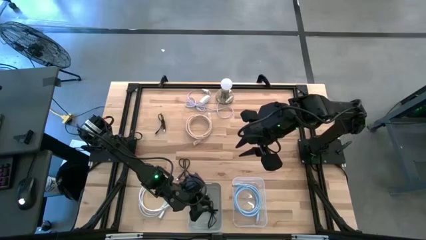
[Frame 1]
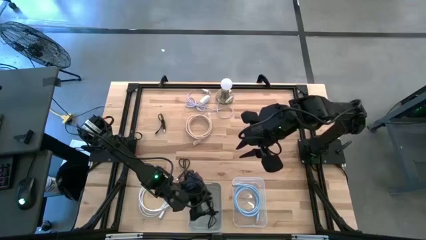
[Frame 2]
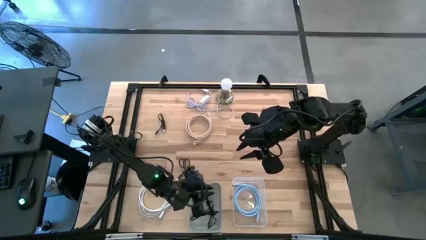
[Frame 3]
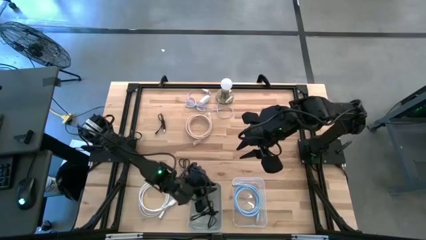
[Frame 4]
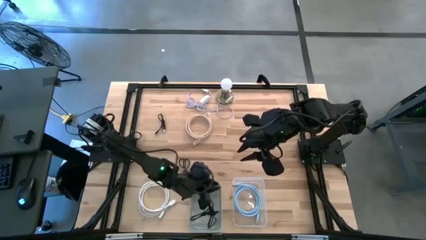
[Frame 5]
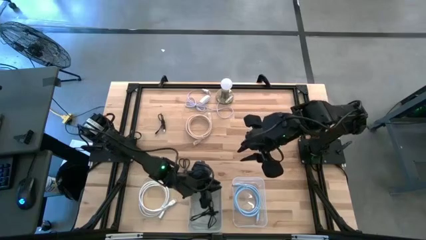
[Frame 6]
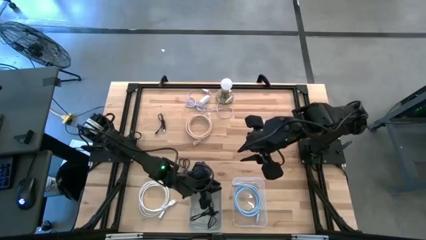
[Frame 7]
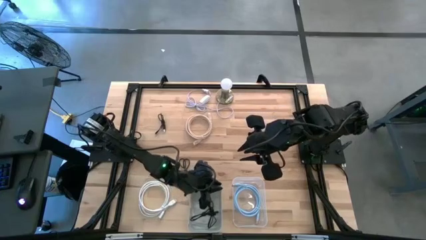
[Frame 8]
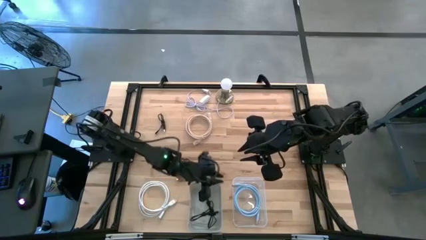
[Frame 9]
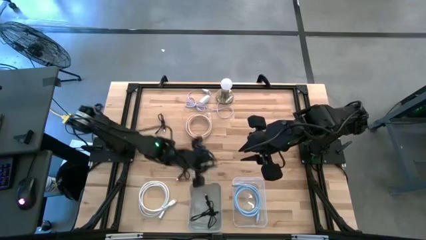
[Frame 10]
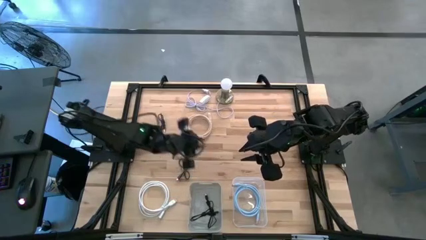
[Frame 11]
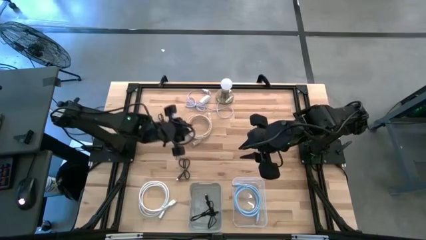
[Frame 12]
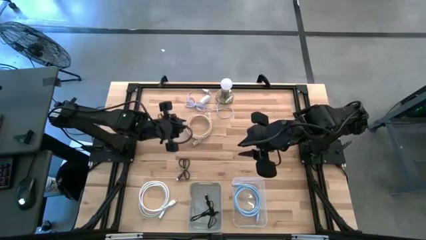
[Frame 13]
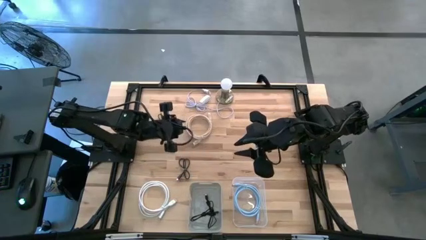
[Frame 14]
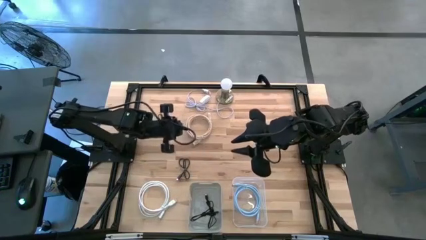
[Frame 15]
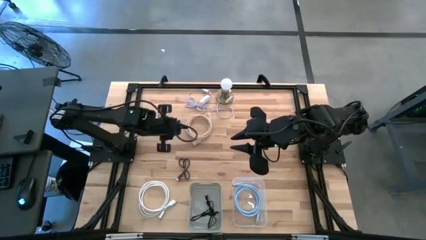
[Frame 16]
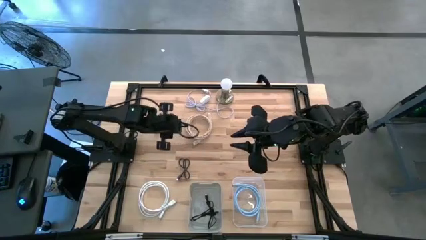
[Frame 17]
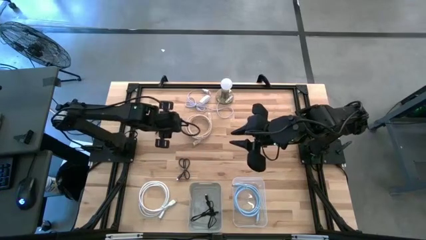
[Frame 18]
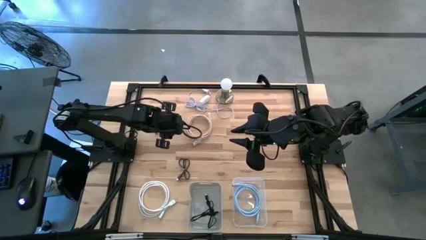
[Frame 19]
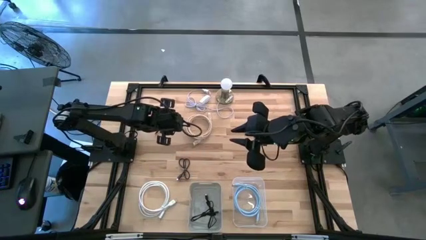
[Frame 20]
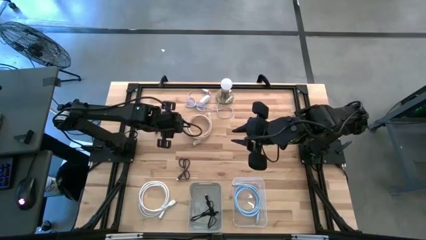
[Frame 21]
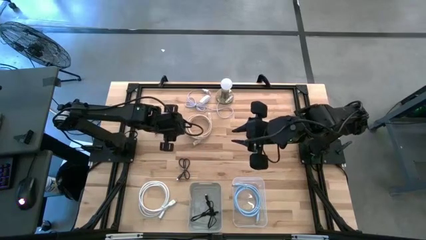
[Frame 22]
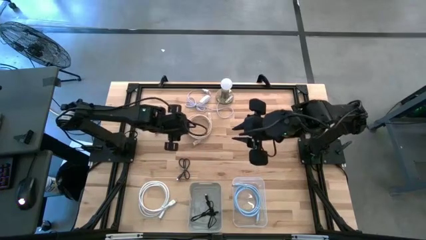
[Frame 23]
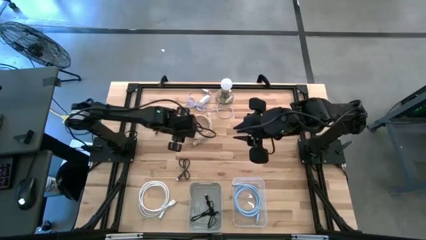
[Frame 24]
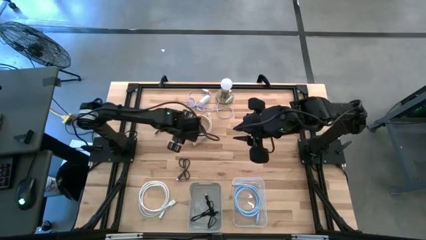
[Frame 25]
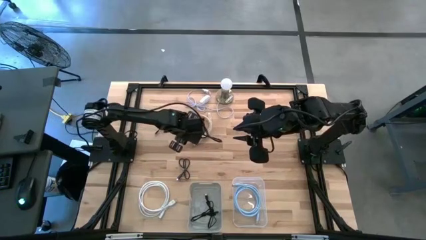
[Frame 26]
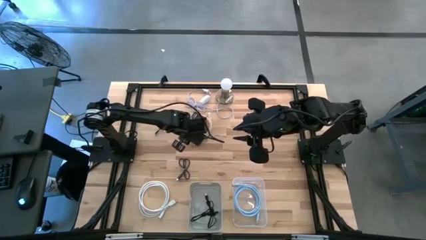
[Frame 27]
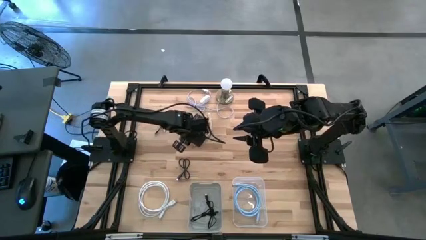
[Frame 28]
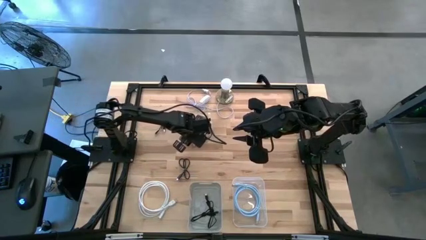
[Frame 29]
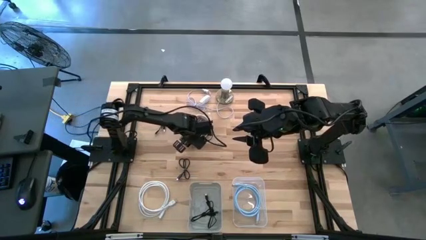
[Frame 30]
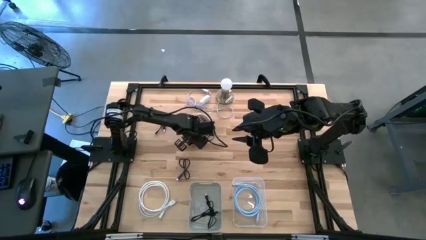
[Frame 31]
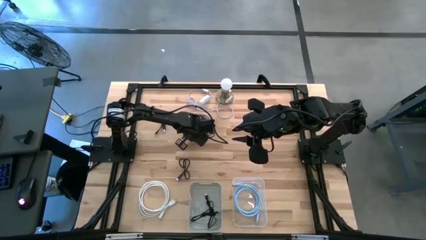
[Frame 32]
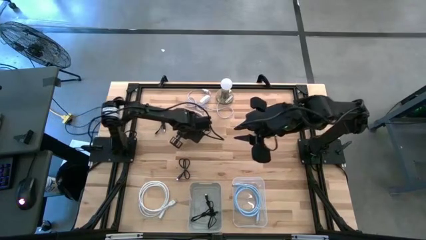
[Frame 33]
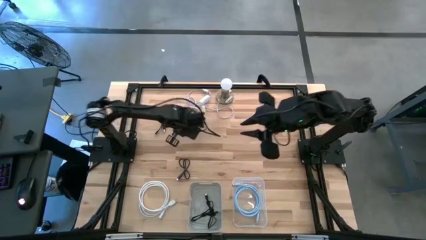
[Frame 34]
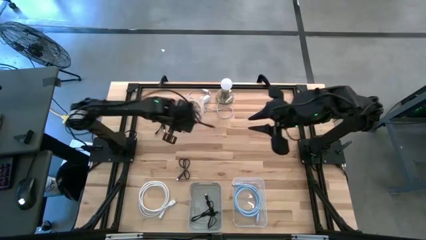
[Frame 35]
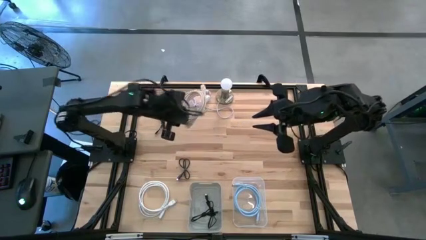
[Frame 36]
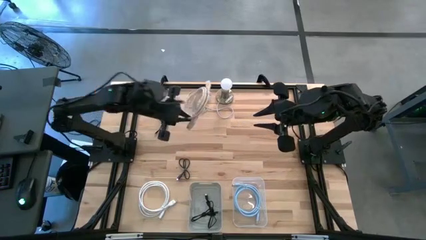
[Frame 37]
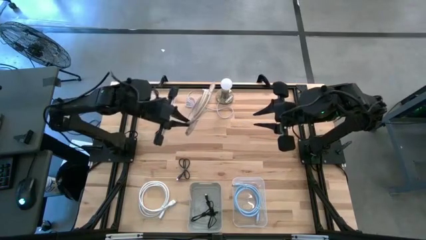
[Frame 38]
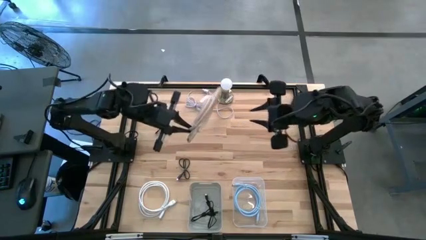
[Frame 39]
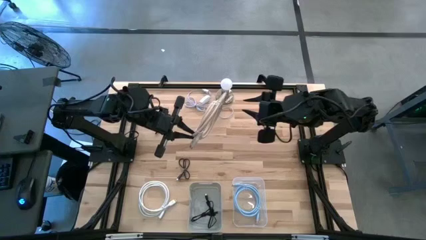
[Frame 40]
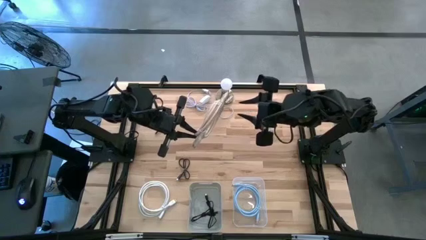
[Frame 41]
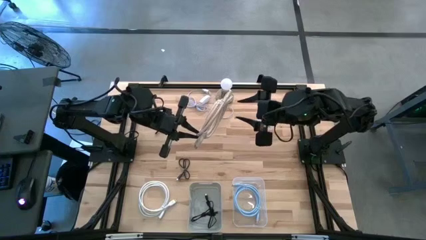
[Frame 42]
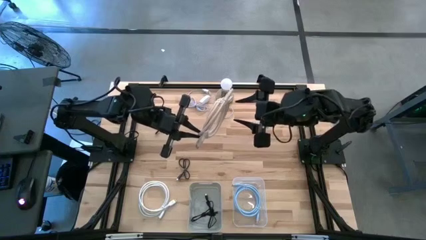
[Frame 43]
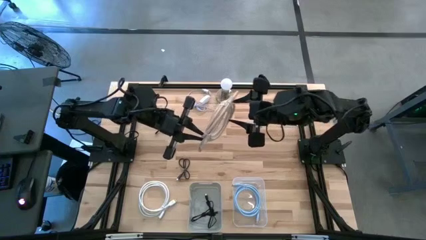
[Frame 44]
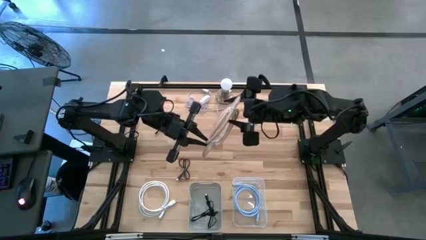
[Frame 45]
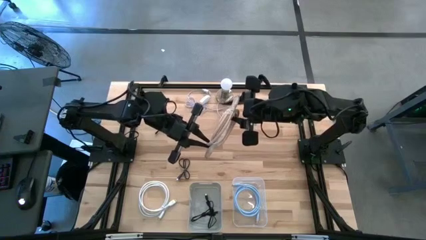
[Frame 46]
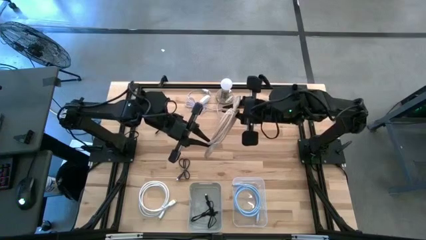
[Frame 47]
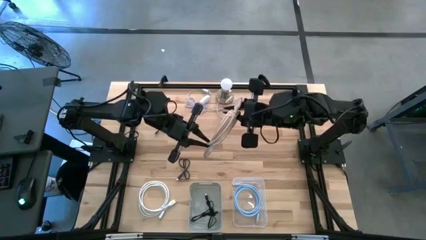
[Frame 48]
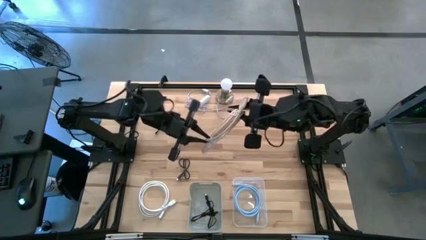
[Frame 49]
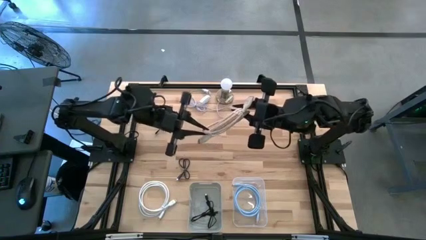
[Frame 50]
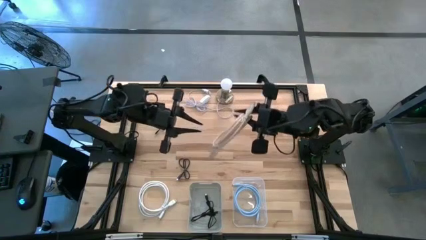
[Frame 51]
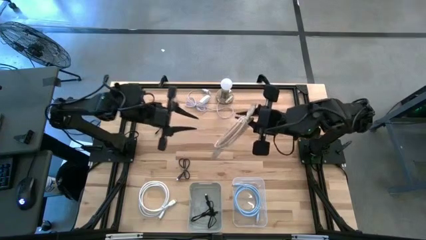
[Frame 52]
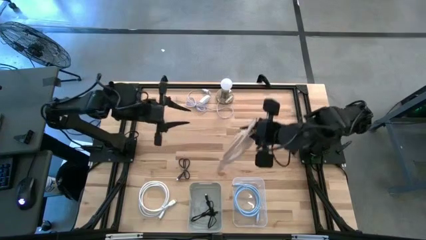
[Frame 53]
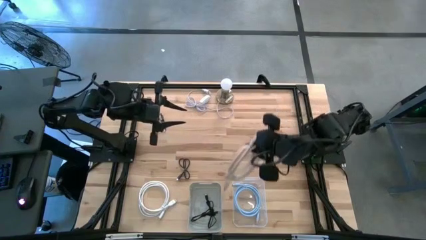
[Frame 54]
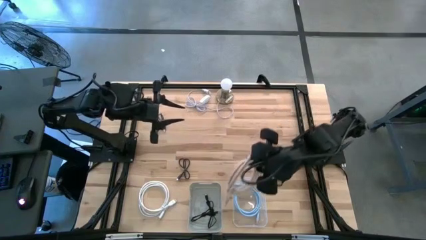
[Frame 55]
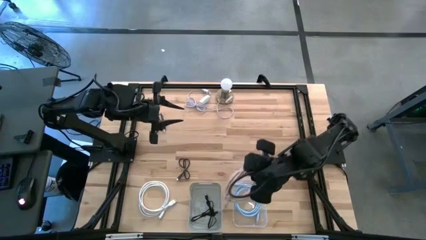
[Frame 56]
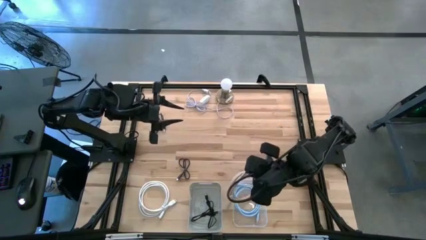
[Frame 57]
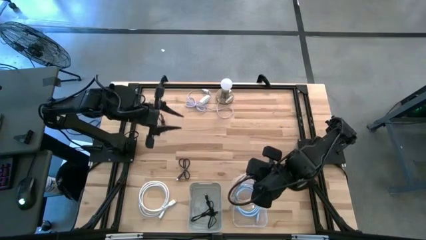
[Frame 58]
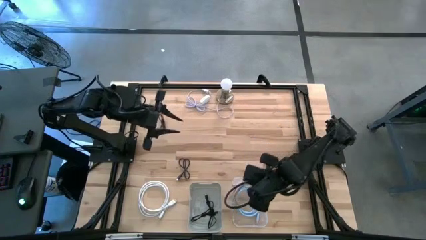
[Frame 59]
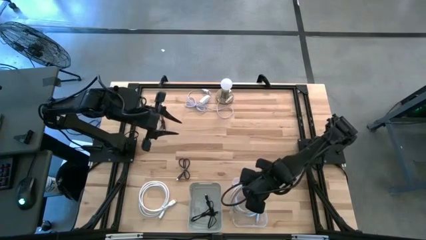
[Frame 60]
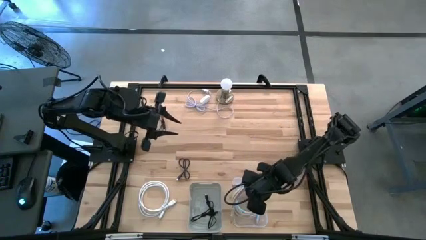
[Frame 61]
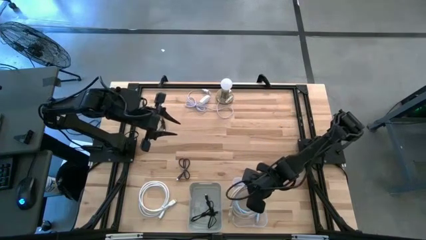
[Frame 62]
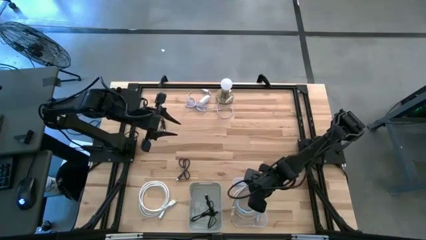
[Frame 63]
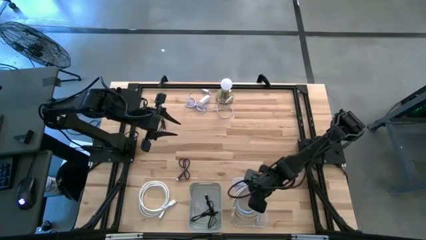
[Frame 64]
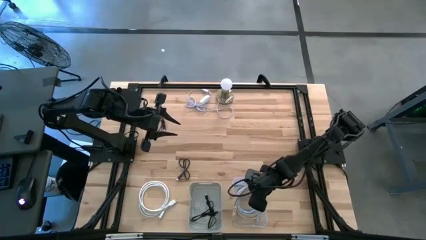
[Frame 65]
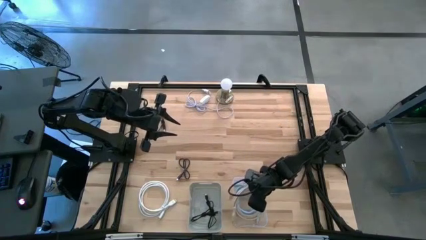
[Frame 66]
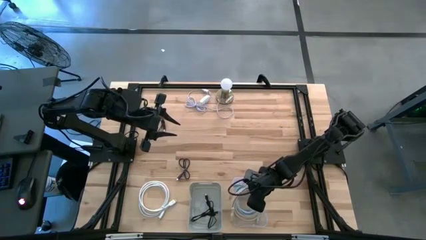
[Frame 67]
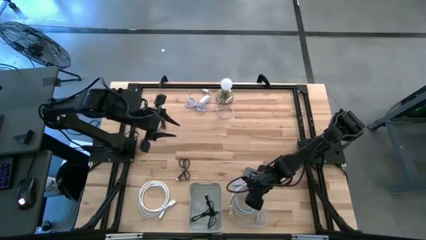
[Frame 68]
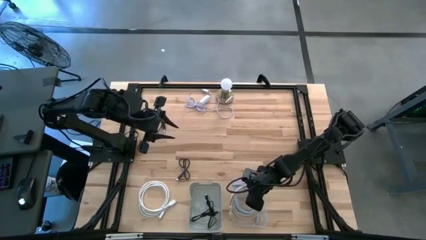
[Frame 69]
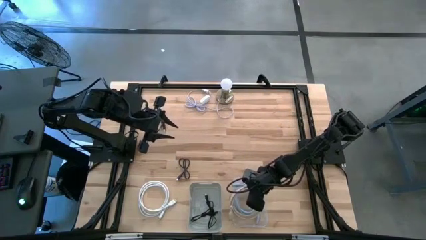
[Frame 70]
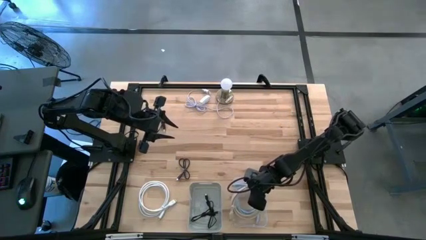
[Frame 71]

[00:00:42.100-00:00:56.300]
Task: Pick & Place USB Port
Put the brown HDMI cable into the transparent bin

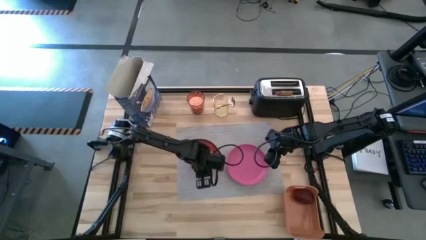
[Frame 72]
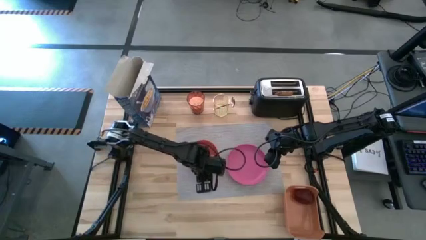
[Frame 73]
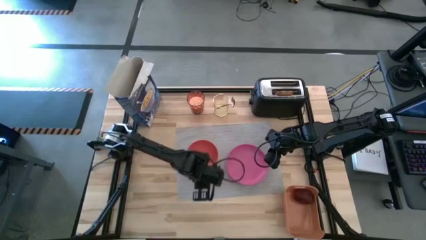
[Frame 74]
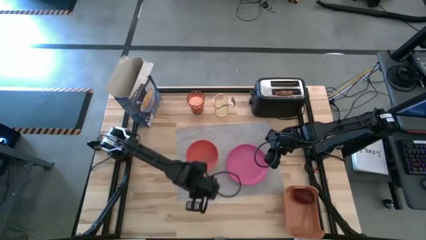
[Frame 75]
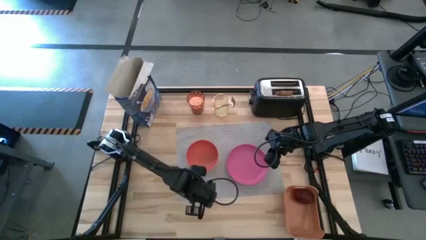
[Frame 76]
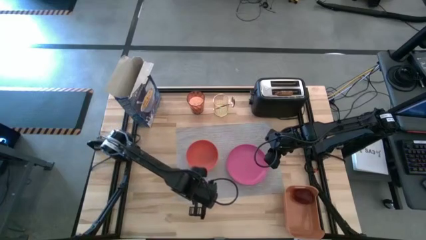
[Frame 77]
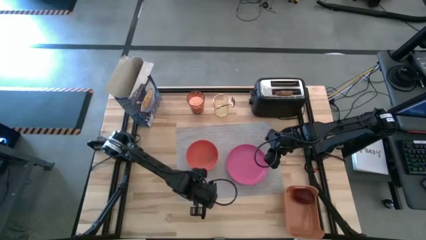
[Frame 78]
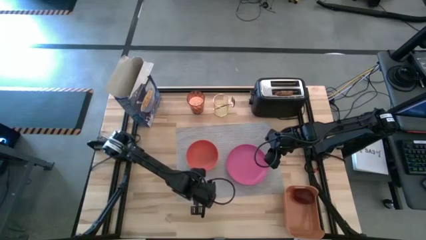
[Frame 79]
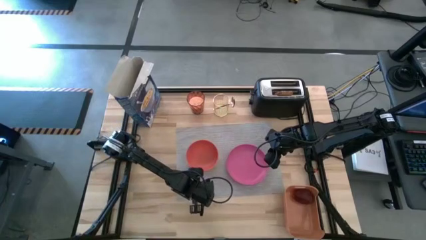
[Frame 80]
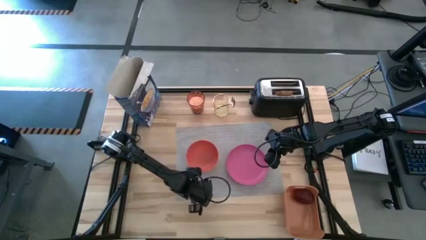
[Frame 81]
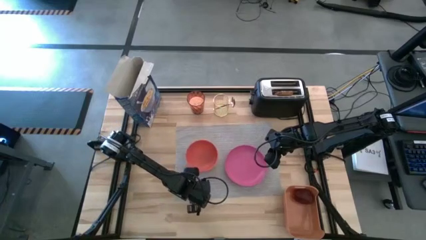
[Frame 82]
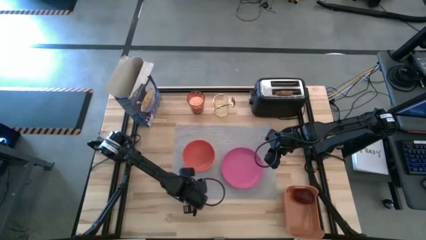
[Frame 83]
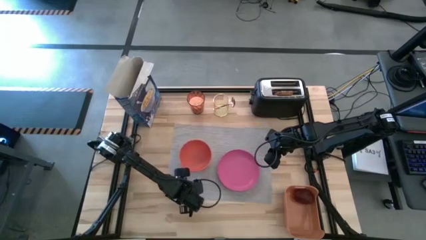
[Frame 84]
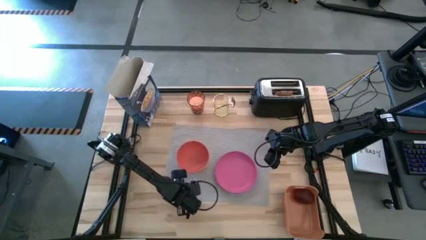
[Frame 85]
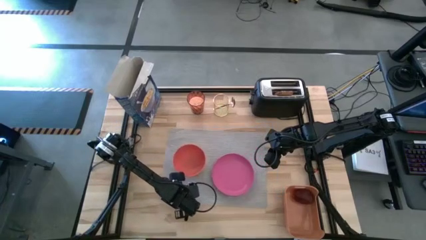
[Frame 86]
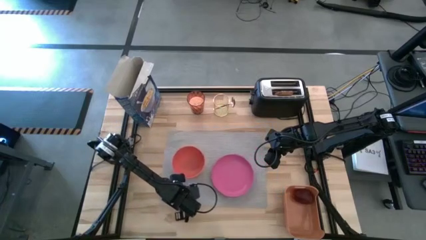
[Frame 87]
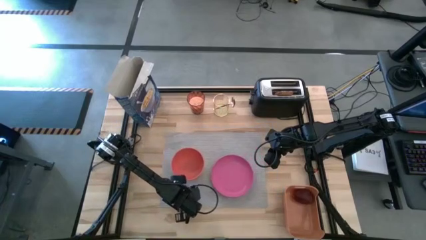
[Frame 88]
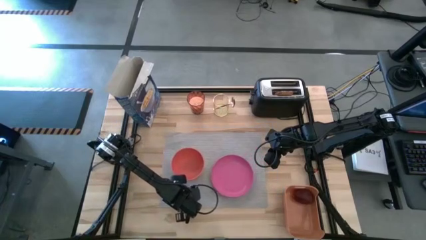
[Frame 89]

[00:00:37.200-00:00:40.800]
Task: Arrange a breakfast setting
Adjust the gray placemat on the center of the table
